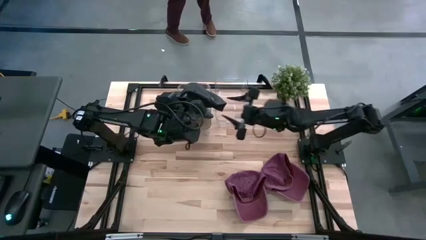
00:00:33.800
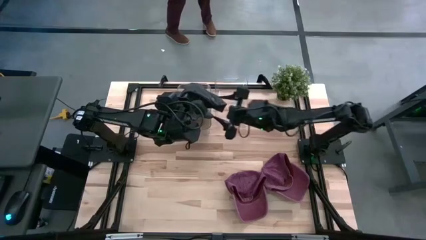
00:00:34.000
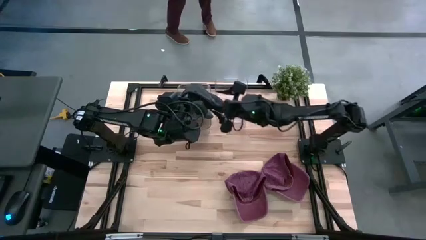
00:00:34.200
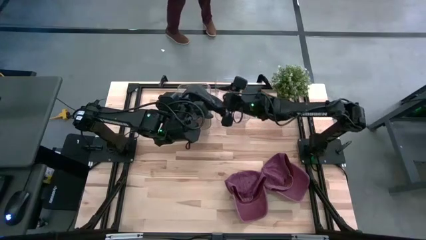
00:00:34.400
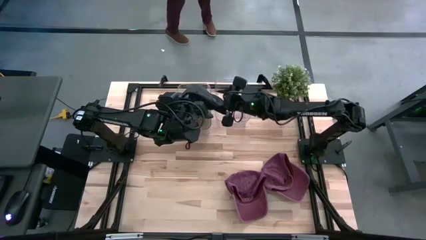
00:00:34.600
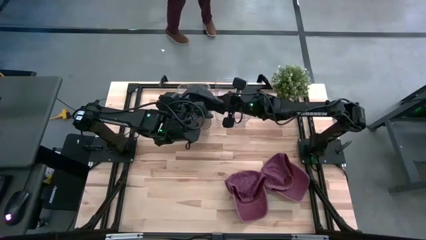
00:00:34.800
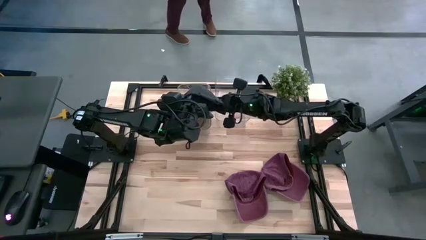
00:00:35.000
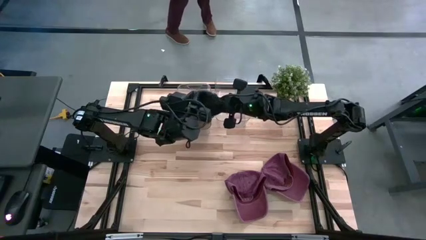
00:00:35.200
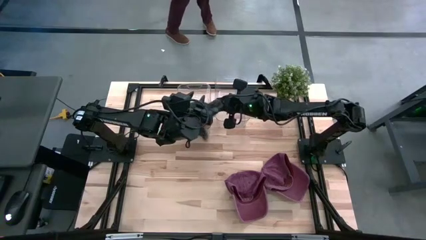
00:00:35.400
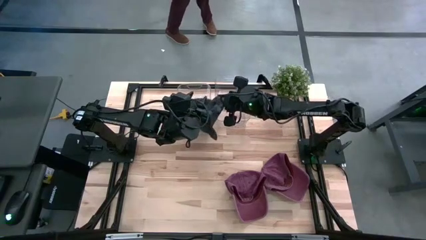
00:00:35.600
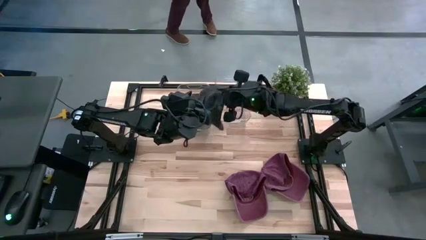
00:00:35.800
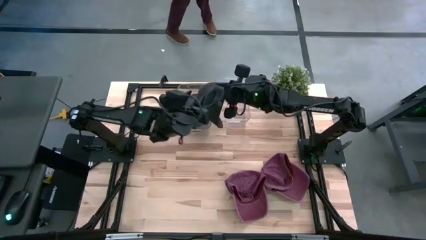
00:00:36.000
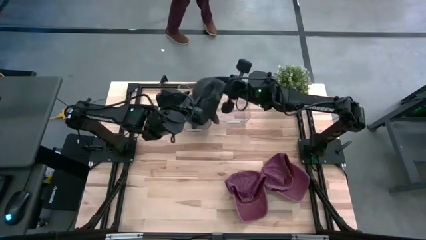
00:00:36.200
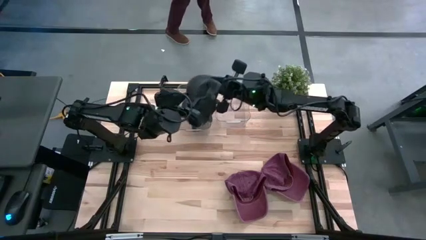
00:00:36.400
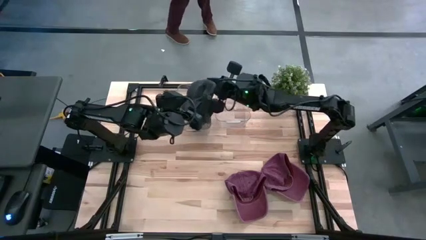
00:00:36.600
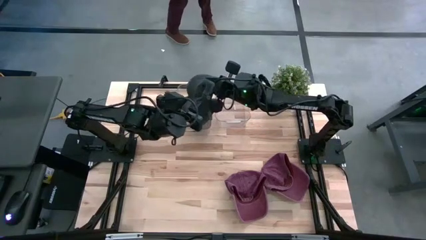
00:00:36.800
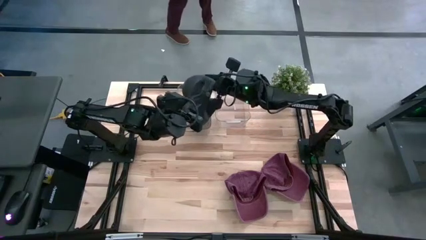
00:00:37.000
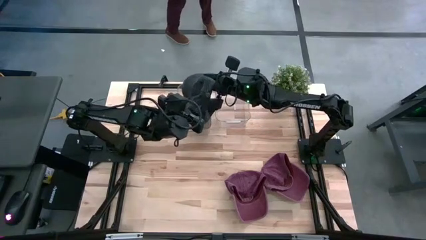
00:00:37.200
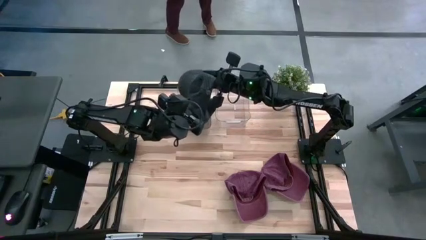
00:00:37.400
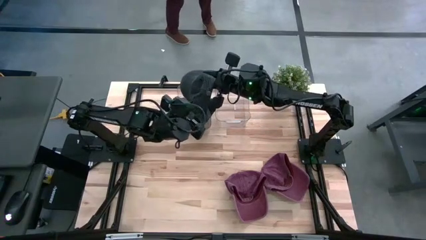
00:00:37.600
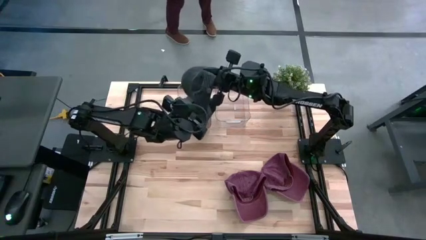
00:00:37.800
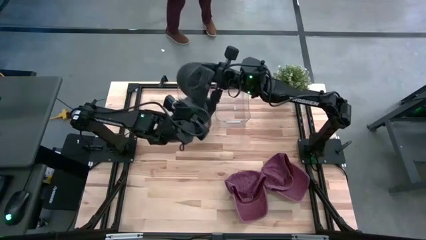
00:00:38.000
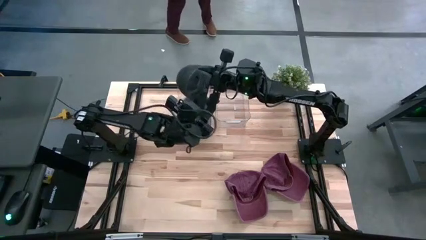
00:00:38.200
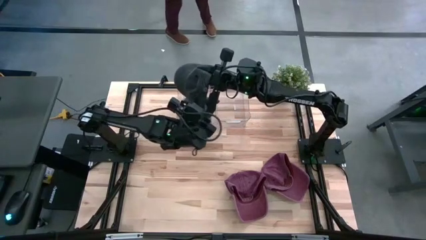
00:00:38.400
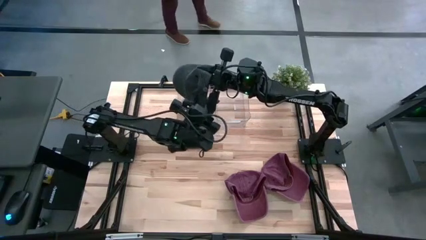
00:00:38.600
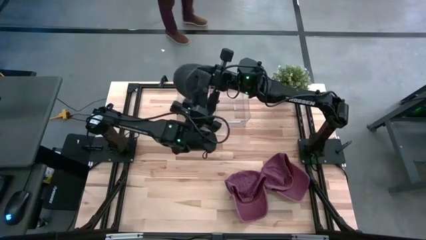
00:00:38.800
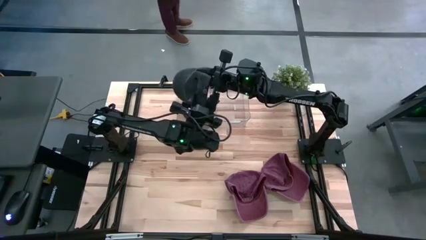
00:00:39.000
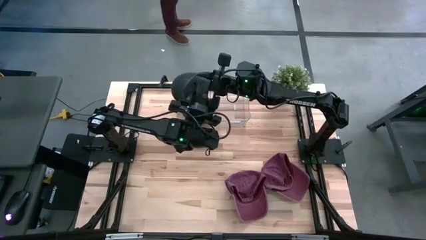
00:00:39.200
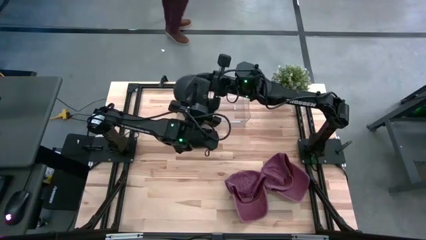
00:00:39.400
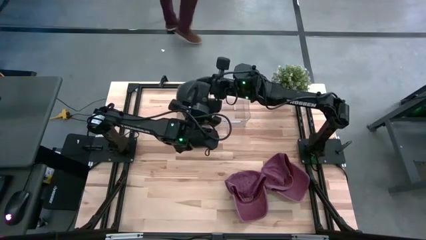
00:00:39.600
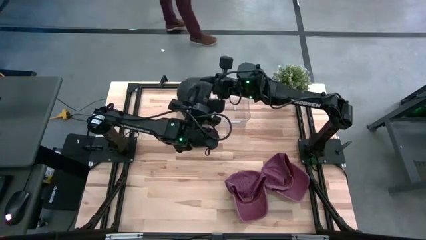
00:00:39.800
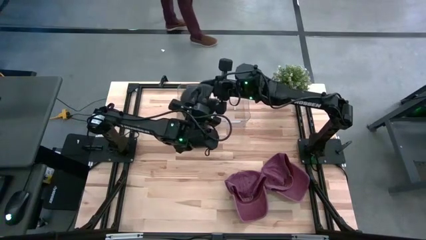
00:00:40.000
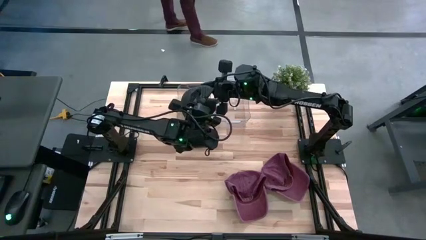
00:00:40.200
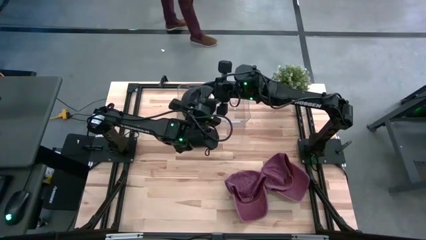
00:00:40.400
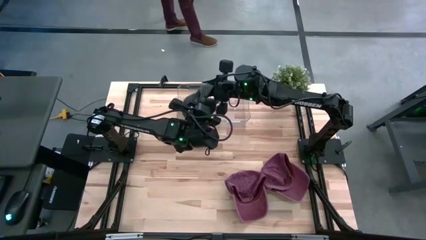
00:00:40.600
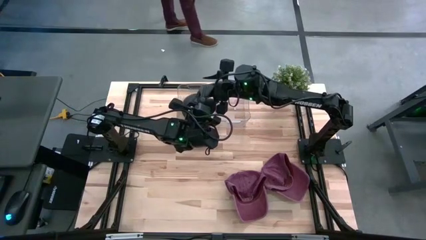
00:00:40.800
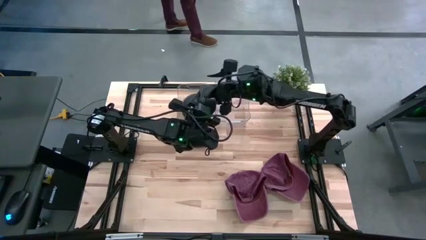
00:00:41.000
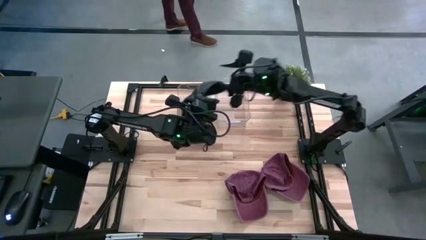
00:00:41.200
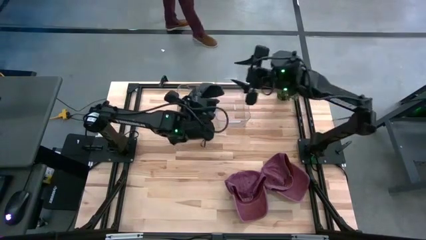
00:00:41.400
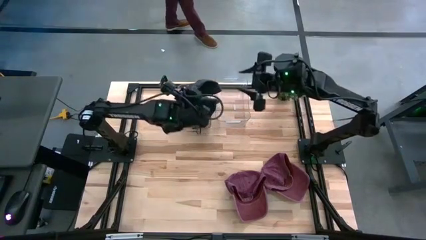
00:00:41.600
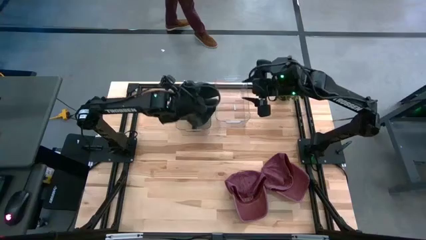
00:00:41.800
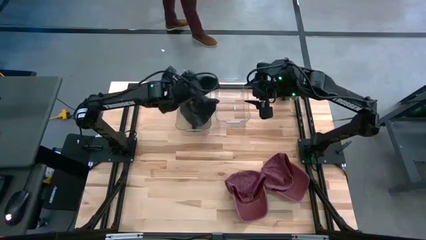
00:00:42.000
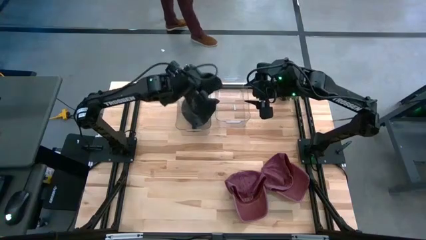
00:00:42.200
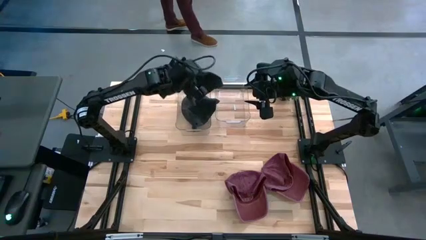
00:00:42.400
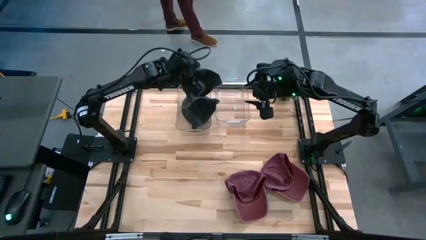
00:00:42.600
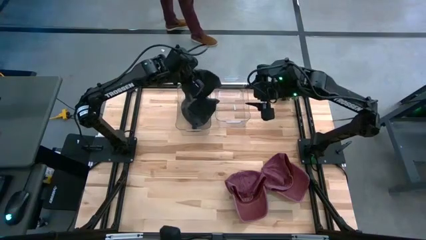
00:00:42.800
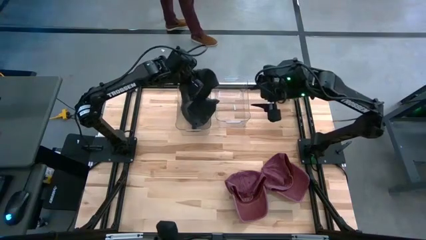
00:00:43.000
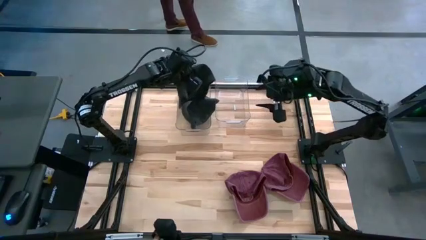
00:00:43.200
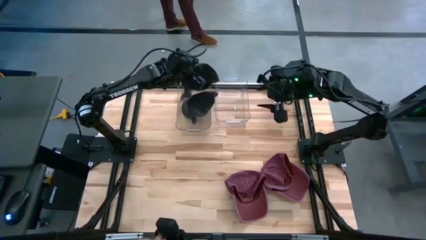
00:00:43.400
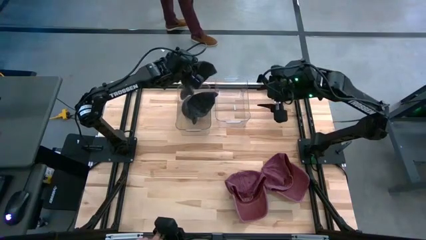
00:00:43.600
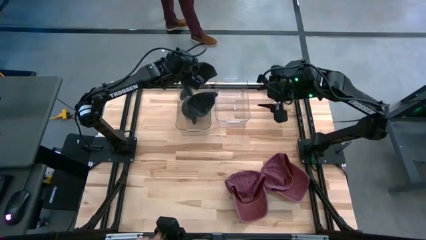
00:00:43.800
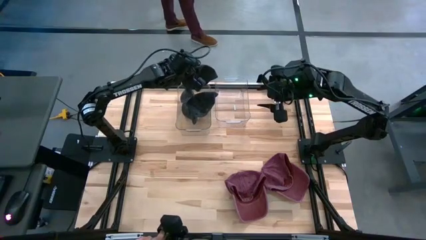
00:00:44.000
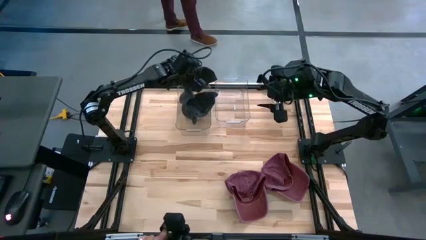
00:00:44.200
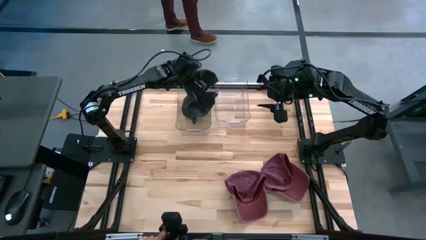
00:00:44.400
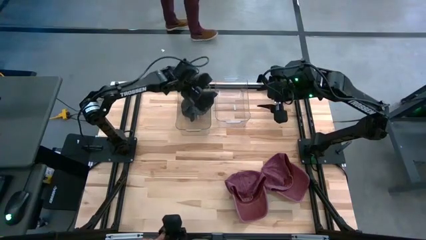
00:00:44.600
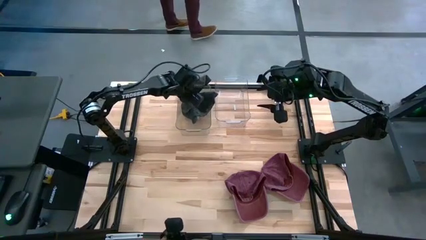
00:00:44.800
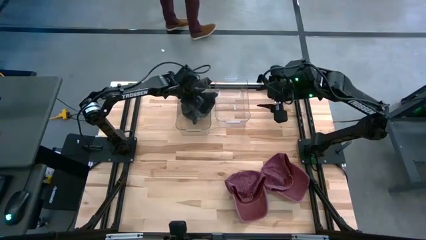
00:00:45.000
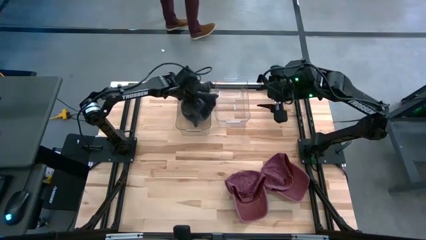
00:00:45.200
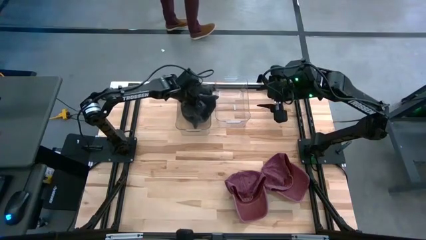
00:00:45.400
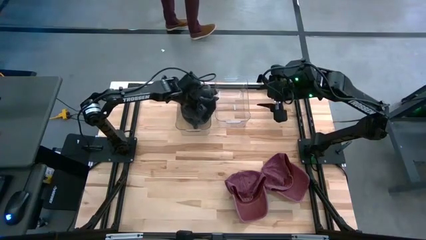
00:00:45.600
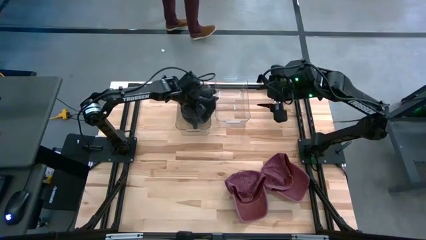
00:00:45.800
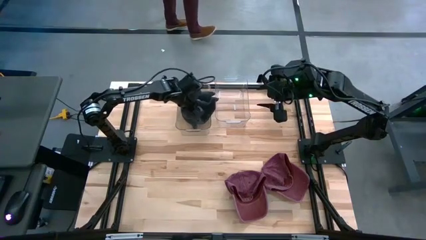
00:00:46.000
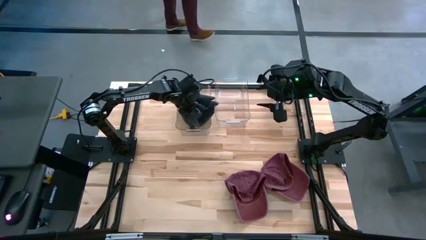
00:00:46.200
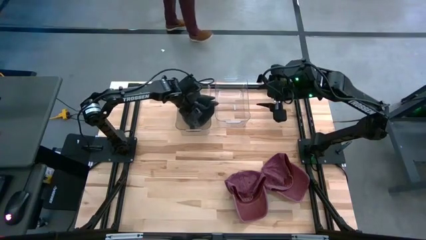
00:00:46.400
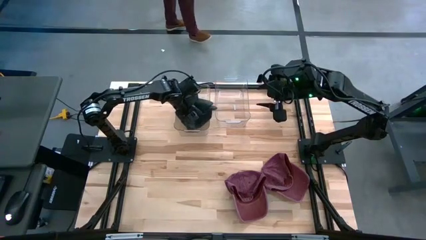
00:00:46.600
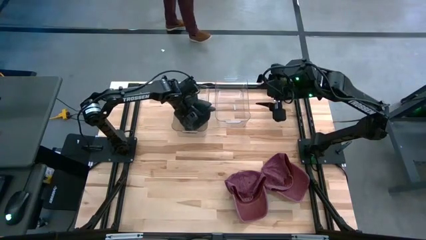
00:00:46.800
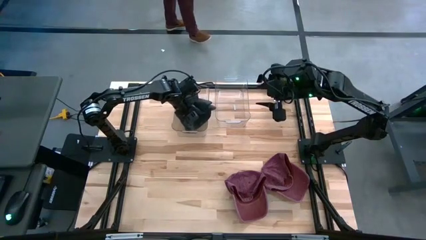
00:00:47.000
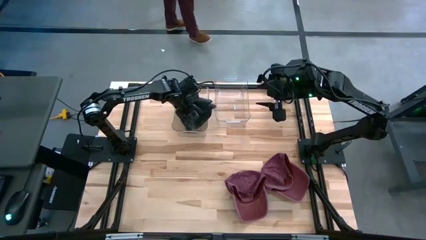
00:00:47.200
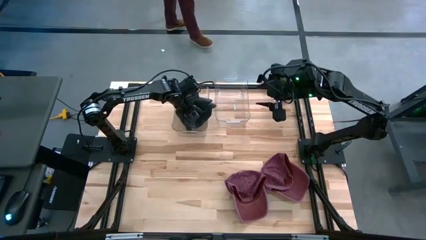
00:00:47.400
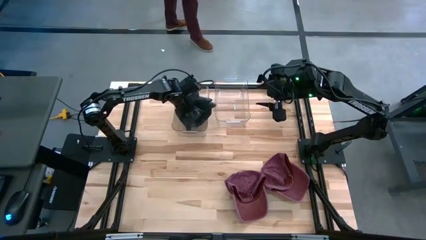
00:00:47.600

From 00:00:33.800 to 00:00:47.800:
Task: Pick & Place hat
Put the black cap into the left transparent bin

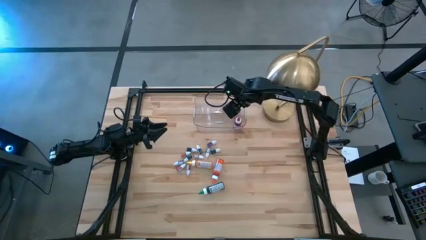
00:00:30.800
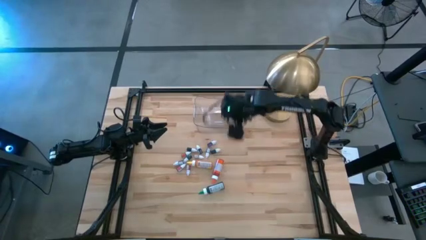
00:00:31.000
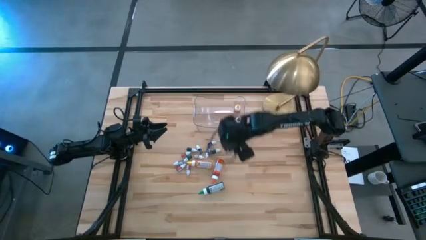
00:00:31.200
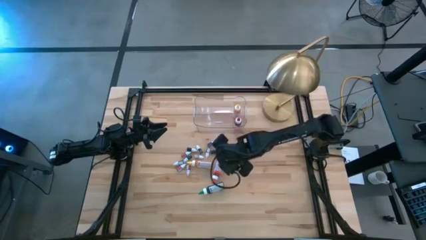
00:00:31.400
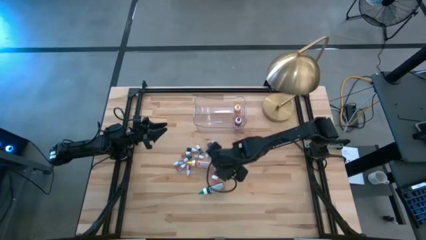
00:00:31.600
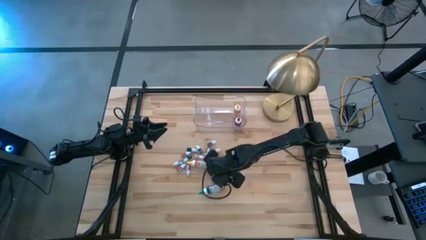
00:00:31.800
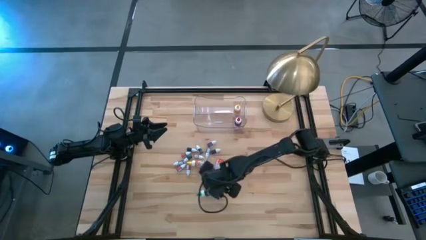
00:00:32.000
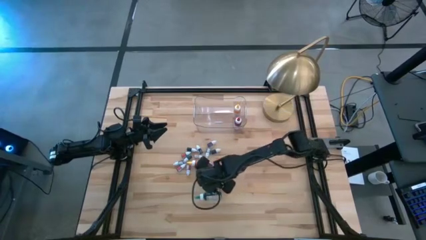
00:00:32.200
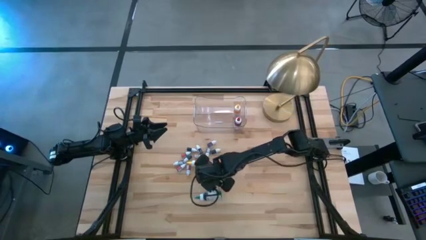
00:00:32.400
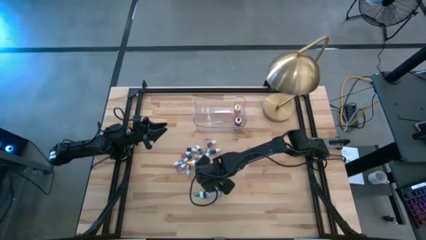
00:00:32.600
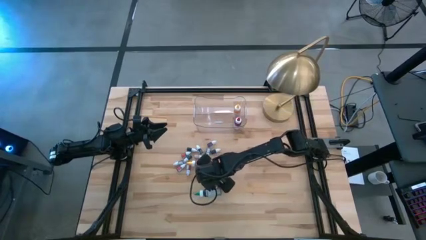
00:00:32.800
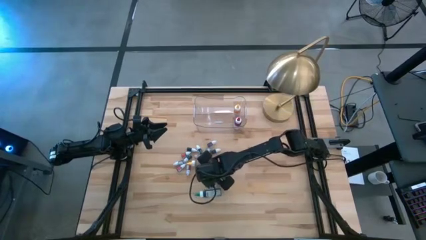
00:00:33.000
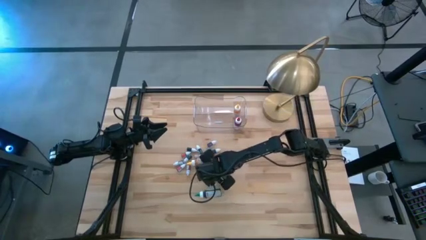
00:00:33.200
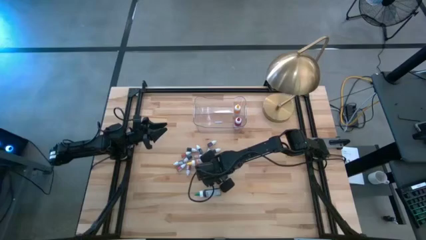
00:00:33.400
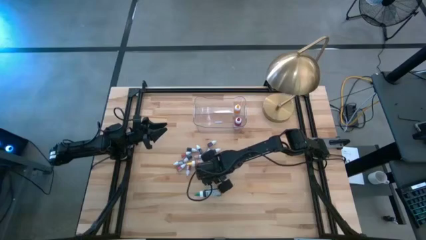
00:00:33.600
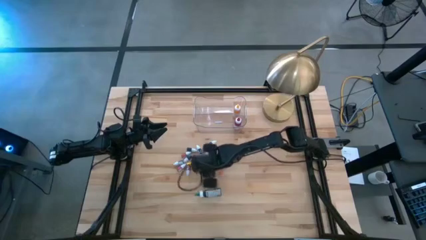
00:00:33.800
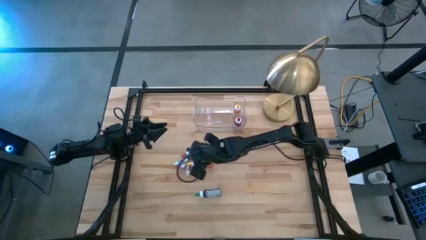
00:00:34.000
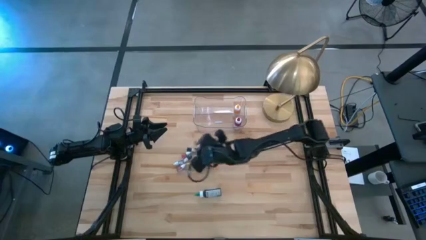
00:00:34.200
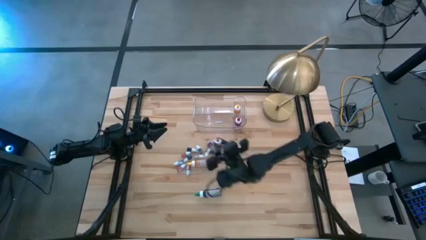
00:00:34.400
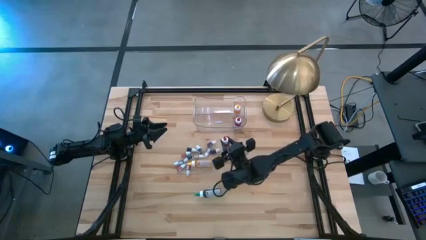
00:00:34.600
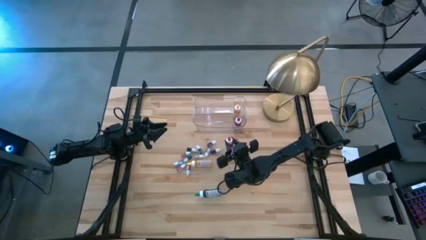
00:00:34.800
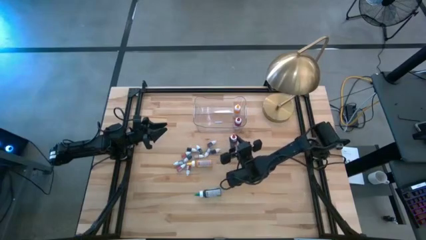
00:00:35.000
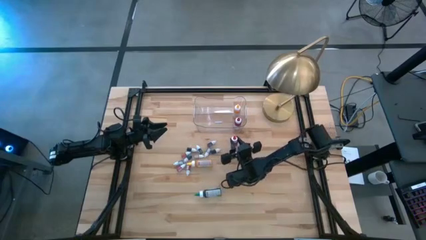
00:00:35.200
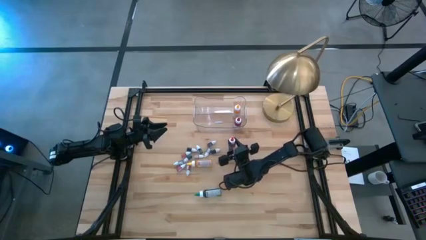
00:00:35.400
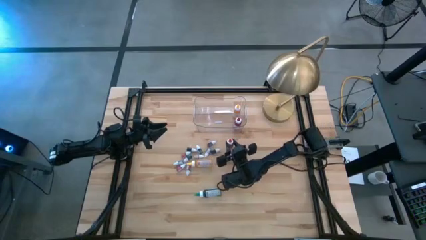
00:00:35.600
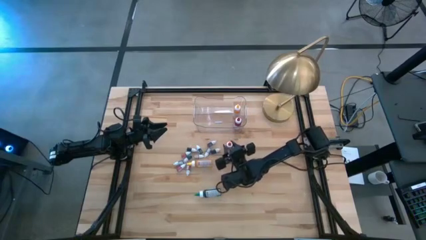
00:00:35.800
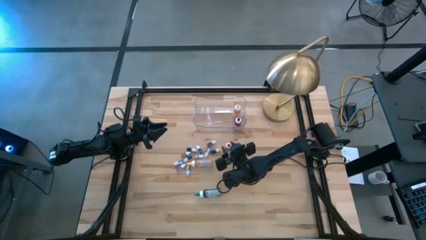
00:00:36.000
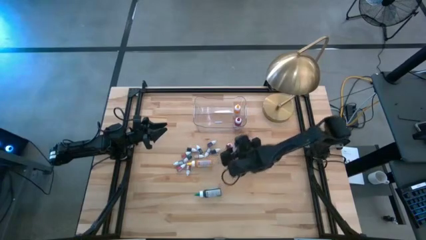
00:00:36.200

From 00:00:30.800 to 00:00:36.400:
Task: Pick & Place food coloring
Move the big orange food coloring bottle to the center of the table
